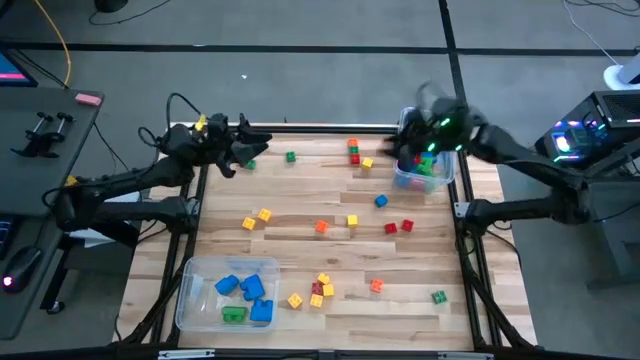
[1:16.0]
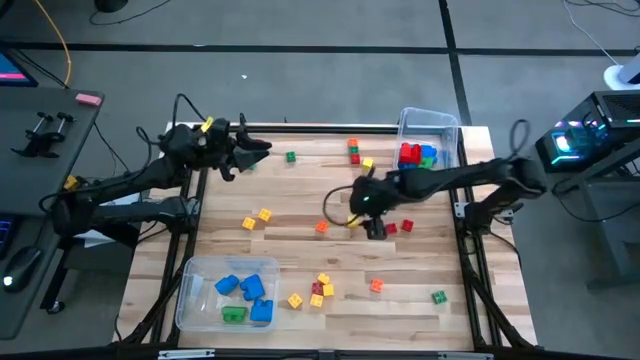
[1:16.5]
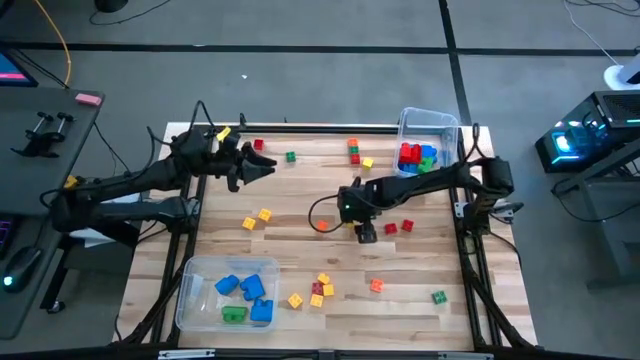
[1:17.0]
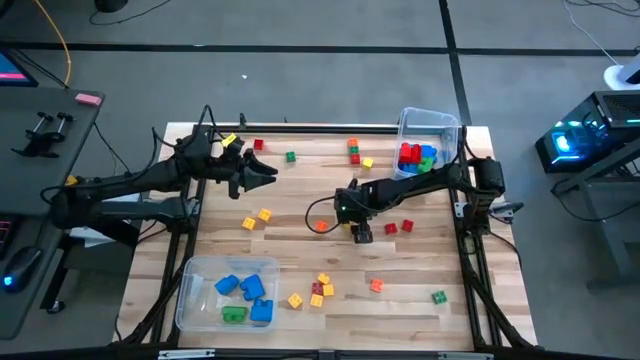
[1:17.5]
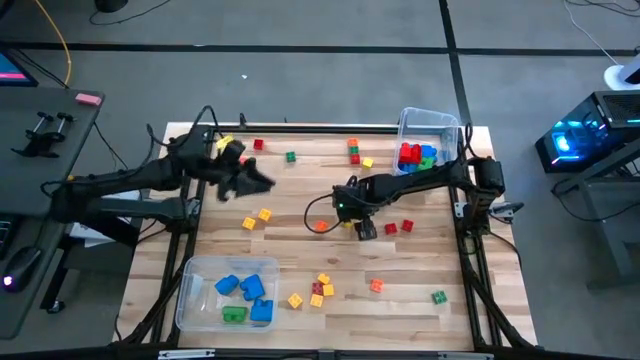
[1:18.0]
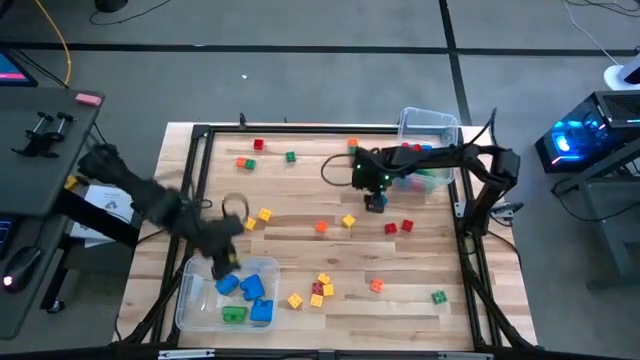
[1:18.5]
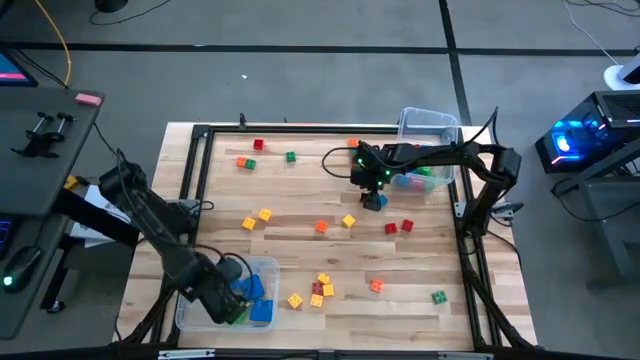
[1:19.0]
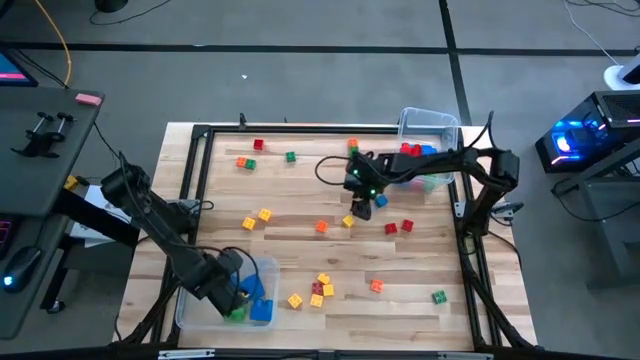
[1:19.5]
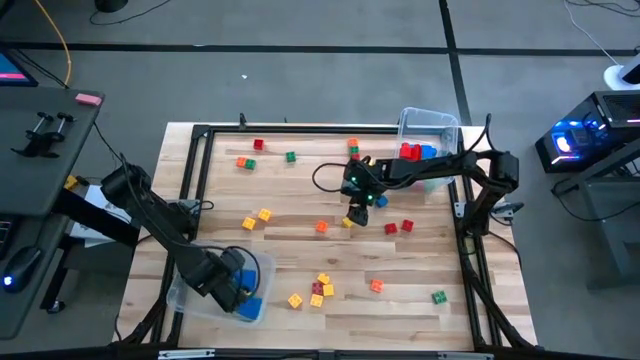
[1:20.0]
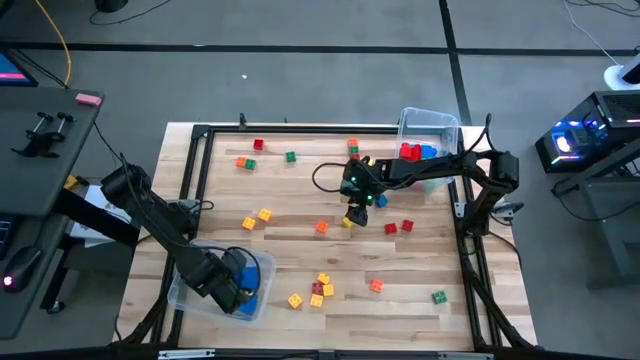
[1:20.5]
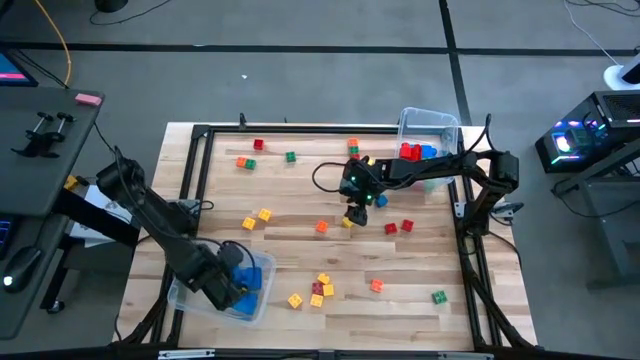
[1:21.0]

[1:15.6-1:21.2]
Task: Sort blocks by size
Put the large blue game piece into the right transparent bin

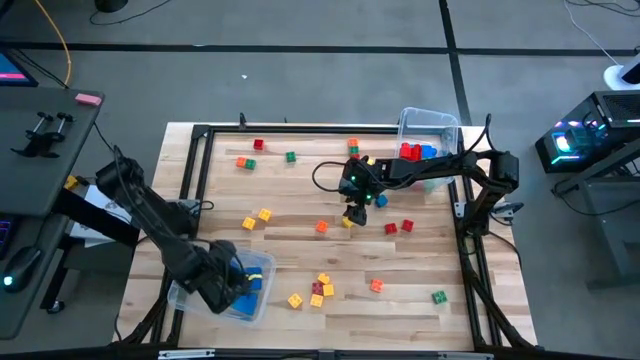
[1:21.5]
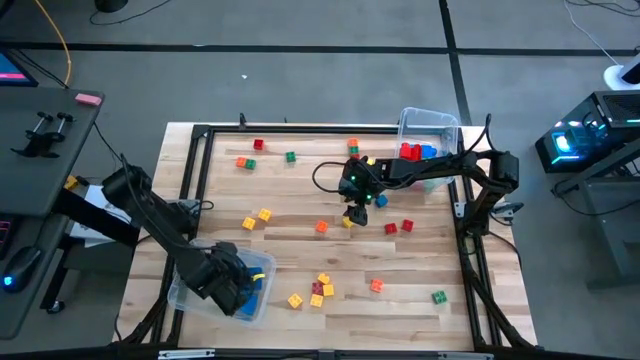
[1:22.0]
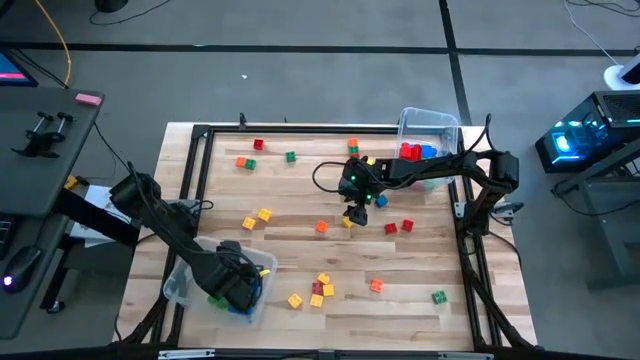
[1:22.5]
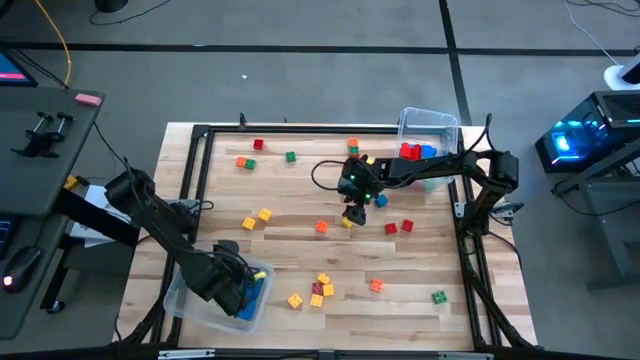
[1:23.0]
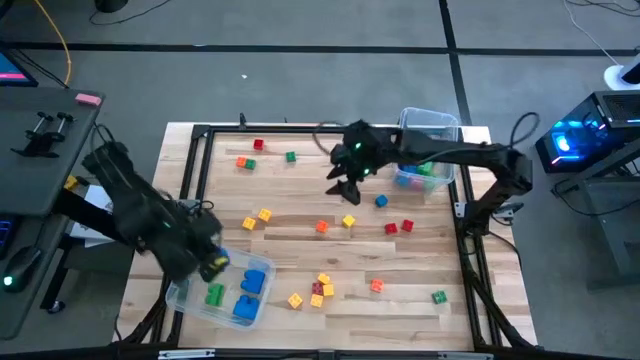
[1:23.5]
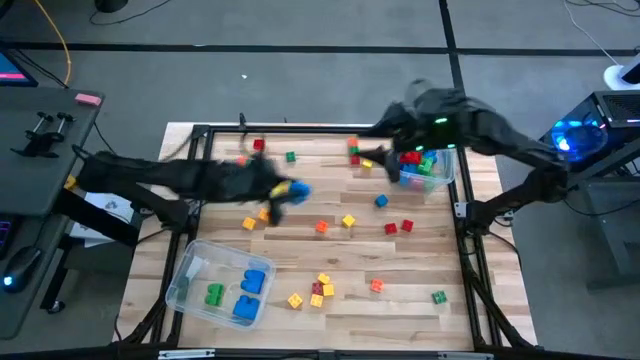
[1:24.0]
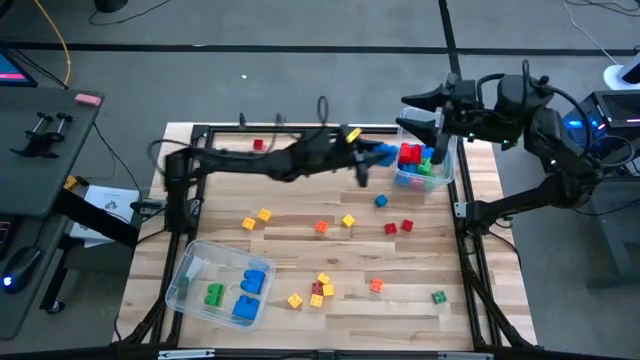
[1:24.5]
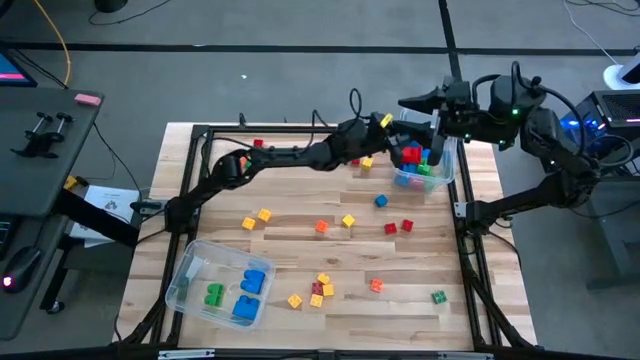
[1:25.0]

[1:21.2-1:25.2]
Put the large blue game piece into the right transparent bin

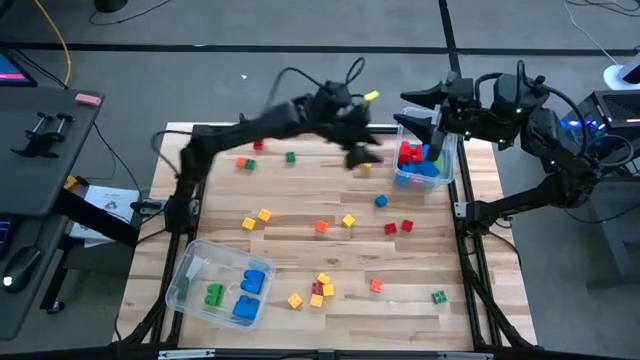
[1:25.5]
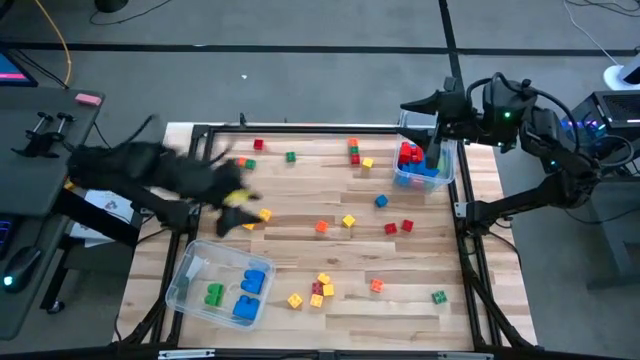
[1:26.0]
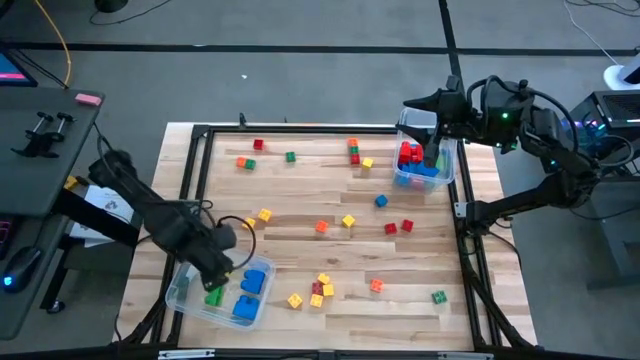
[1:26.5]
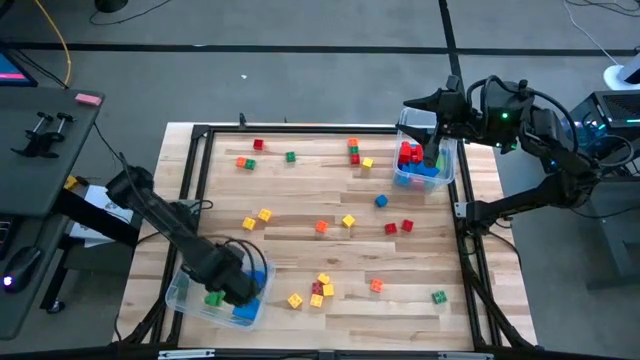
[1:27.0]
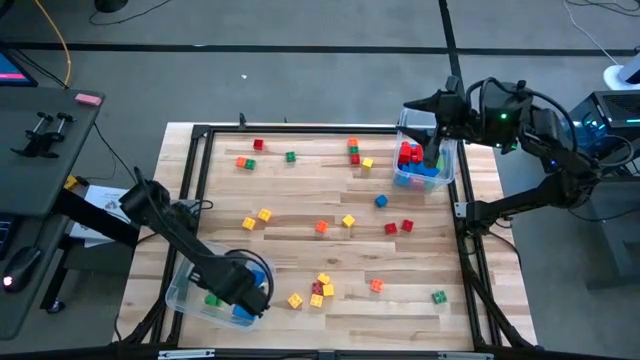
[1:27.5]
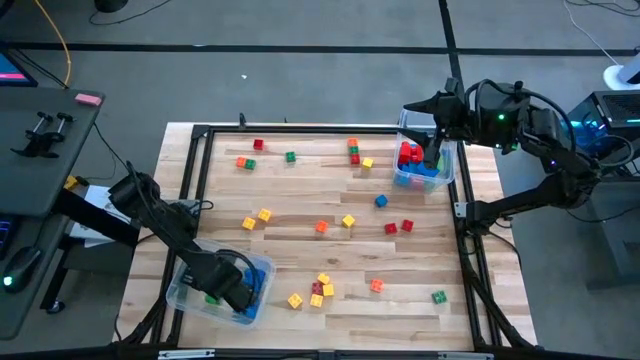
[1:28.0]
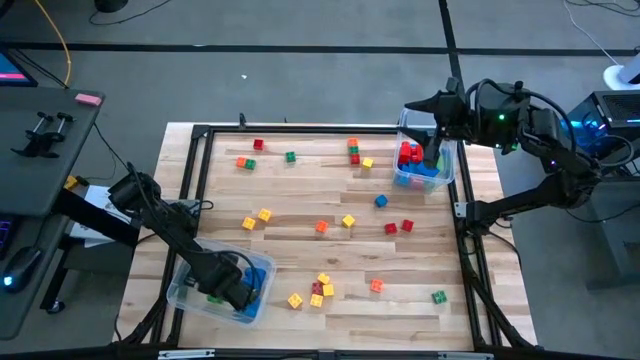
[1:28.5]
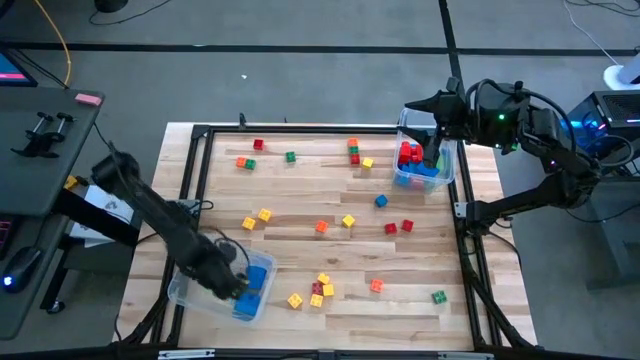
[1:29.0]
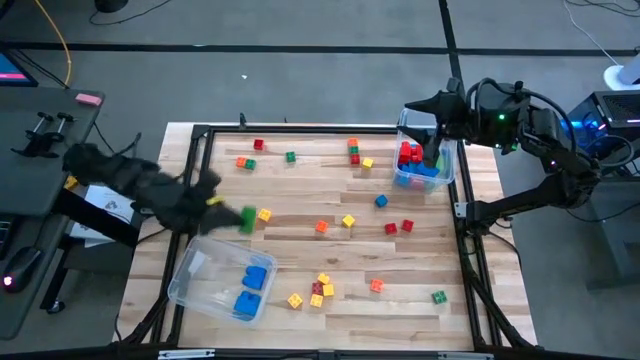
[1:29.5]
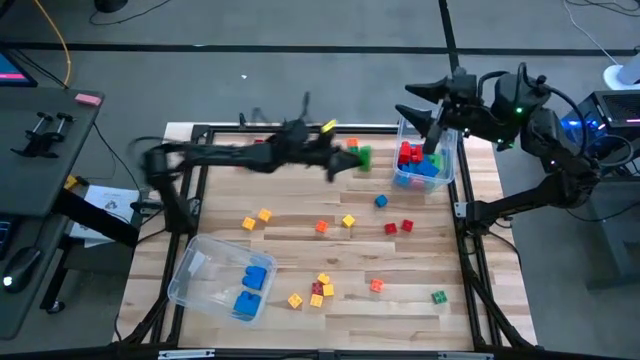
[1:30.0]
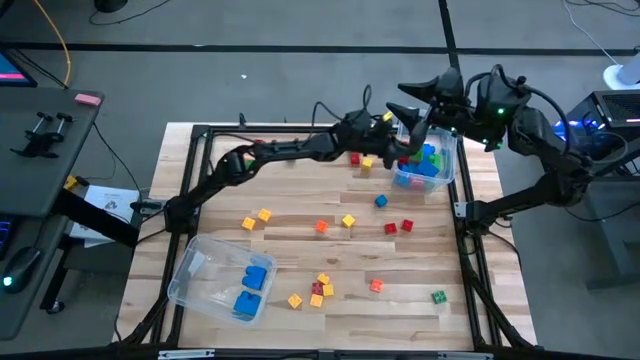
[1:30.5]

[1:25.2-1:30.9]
Put the large green game piece into the right transparent bin

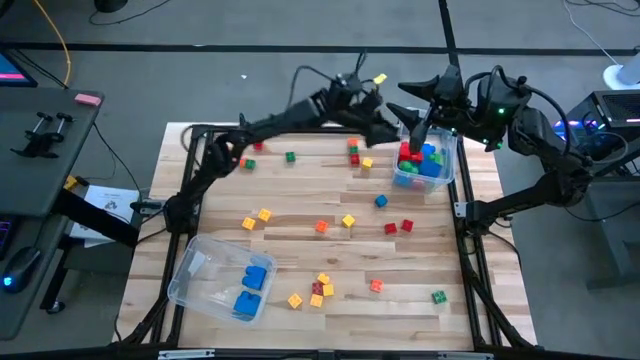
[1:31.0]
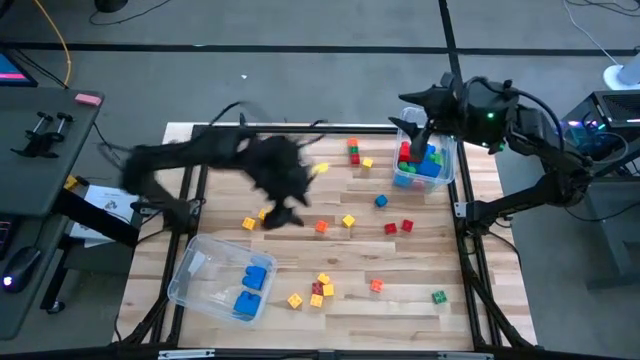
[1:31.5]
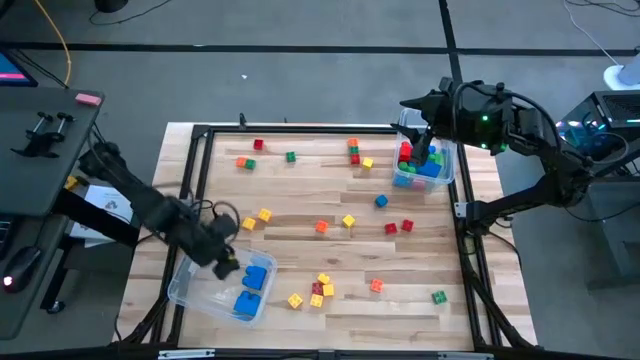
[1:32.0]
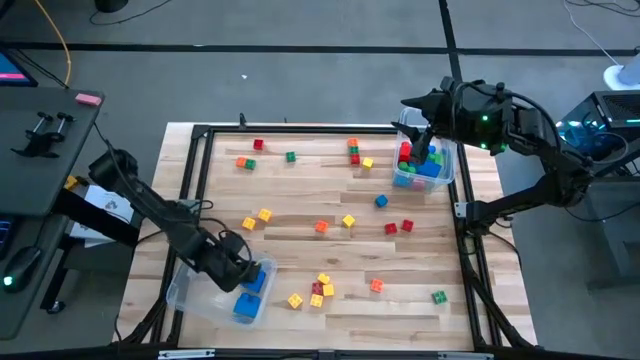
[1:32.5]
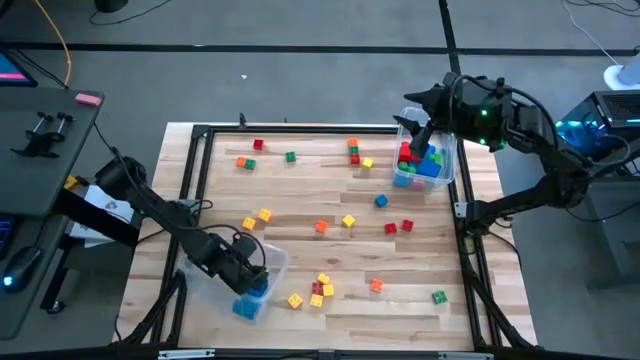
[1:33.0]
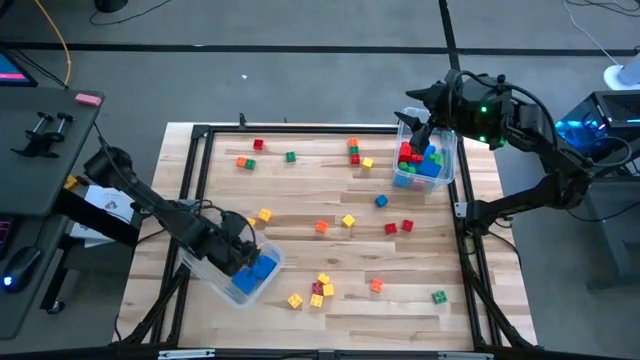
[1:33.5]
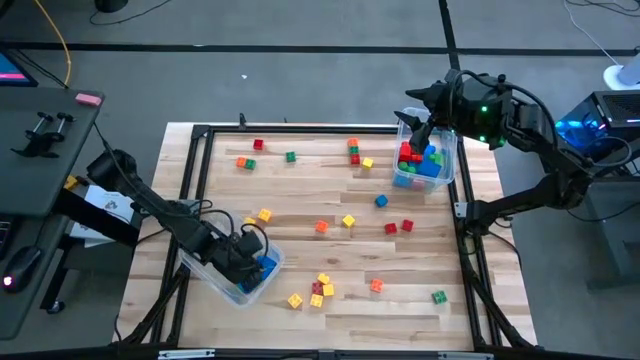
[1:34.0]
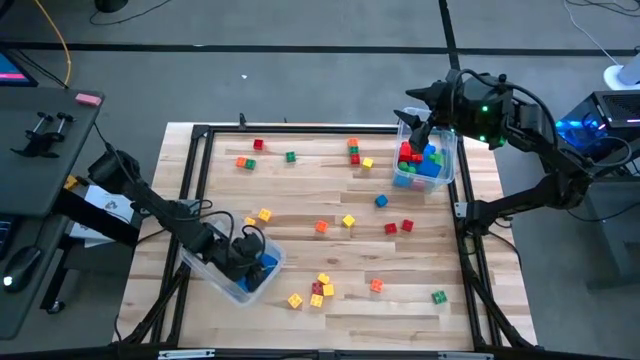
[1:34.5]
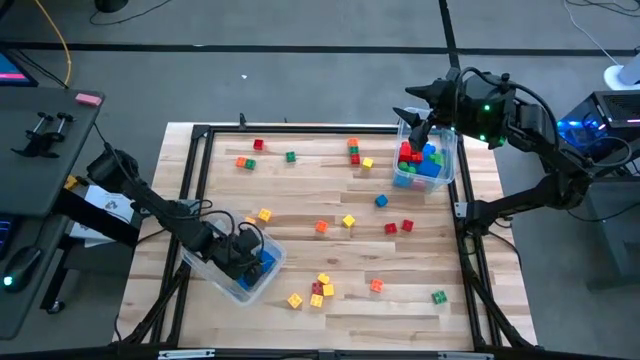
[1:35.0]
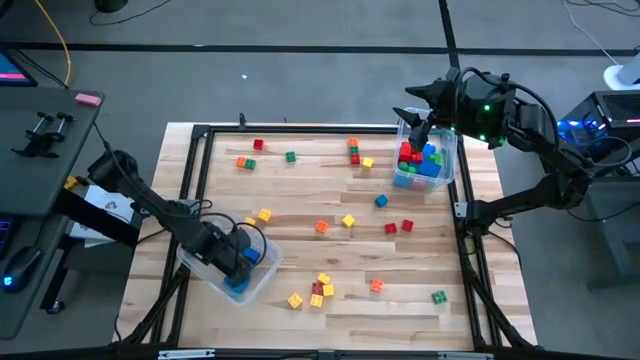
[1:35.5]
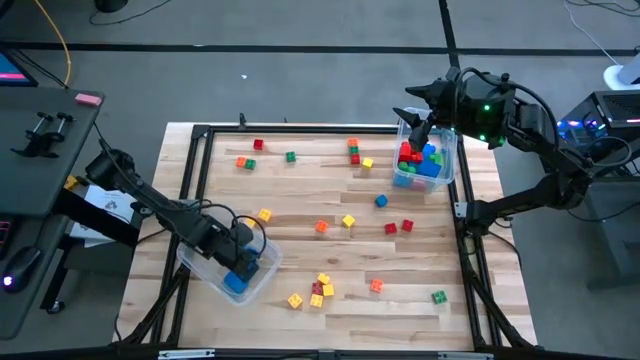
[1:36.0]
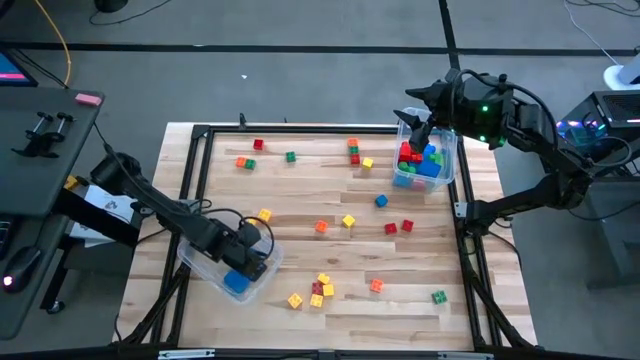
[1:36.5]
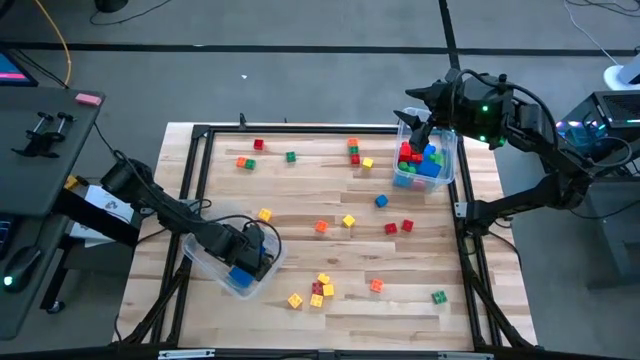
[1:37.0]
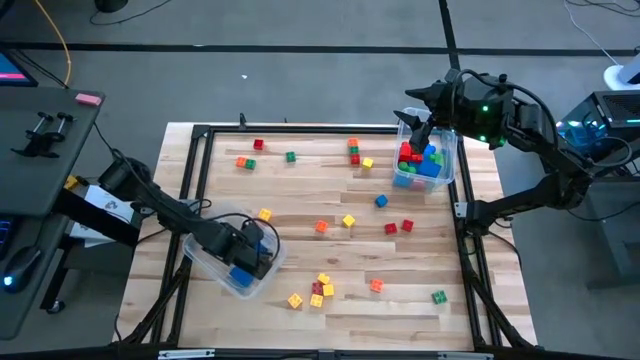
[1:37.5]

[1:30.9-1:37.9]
Put the large blue game piece into the right transparent bin
